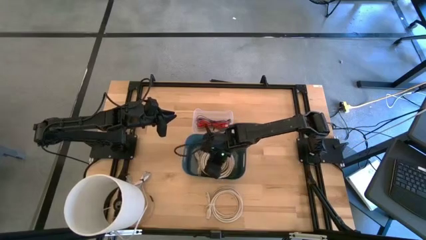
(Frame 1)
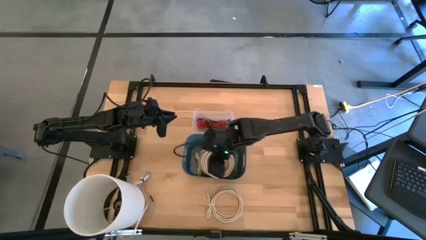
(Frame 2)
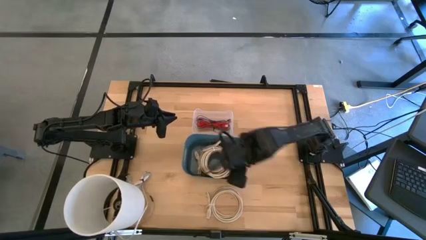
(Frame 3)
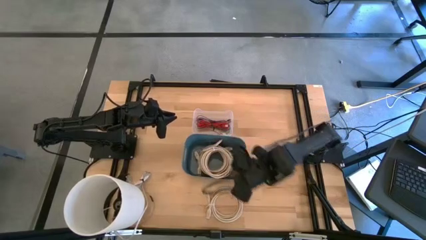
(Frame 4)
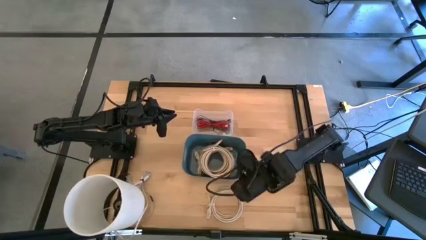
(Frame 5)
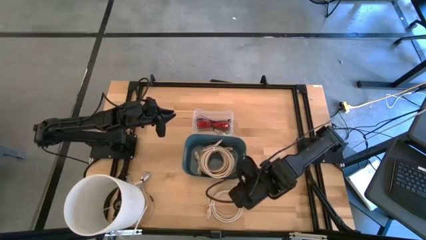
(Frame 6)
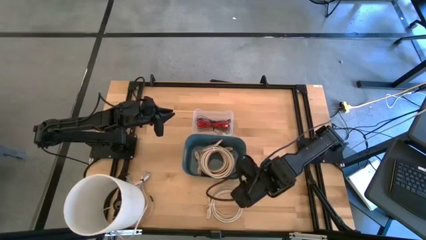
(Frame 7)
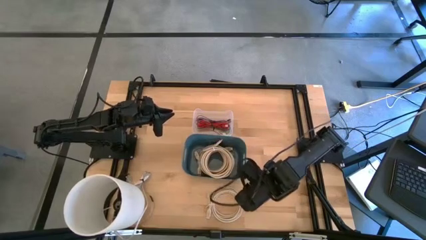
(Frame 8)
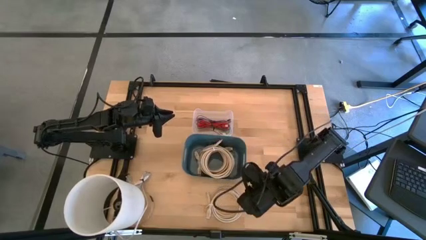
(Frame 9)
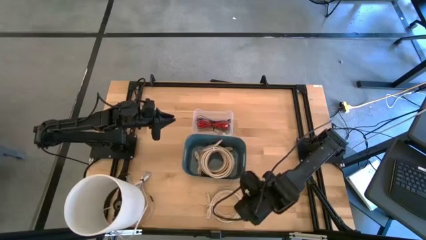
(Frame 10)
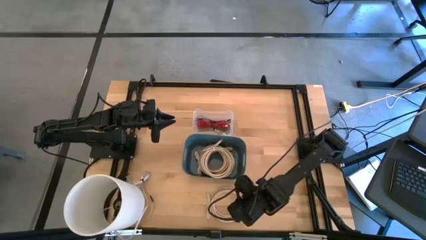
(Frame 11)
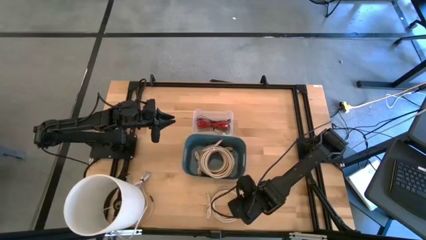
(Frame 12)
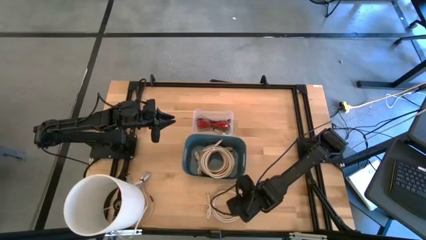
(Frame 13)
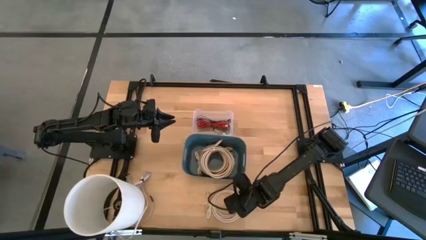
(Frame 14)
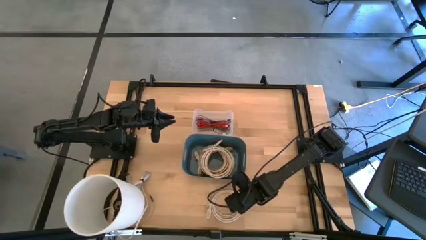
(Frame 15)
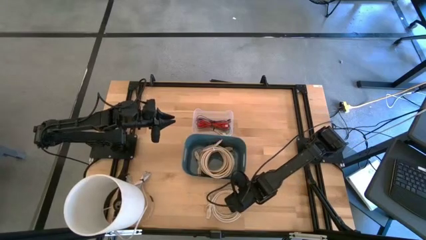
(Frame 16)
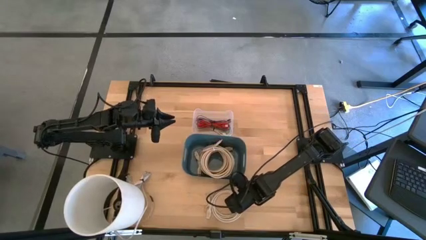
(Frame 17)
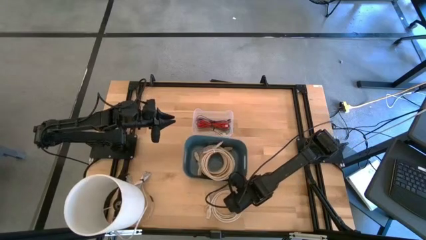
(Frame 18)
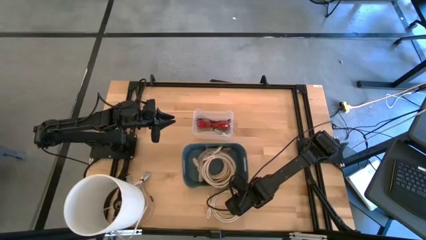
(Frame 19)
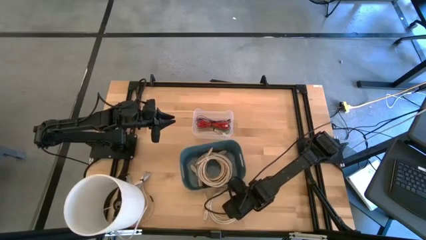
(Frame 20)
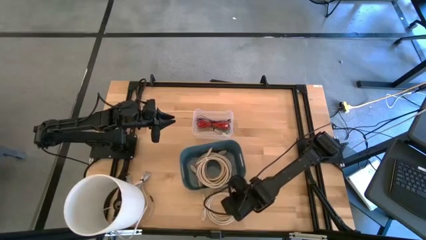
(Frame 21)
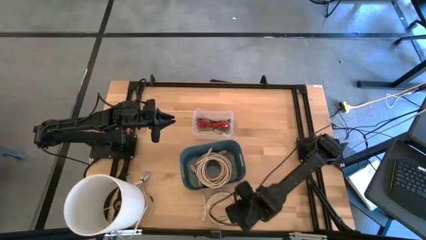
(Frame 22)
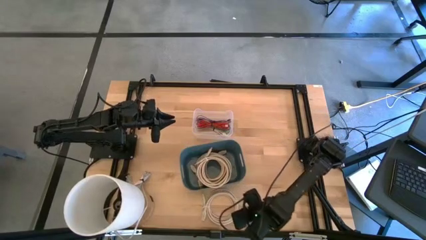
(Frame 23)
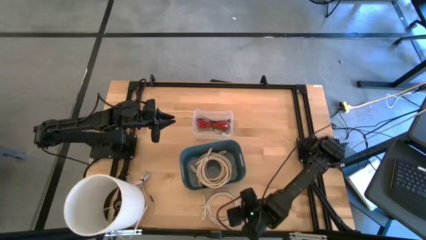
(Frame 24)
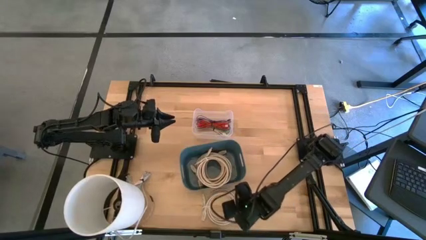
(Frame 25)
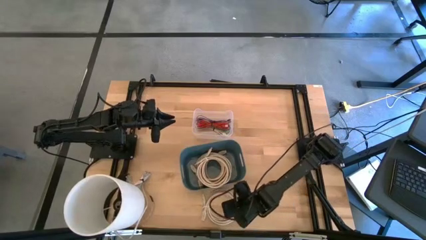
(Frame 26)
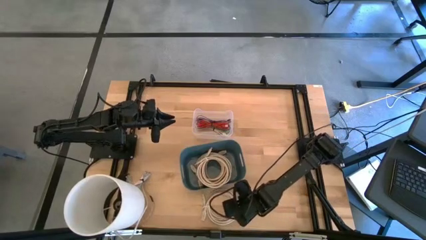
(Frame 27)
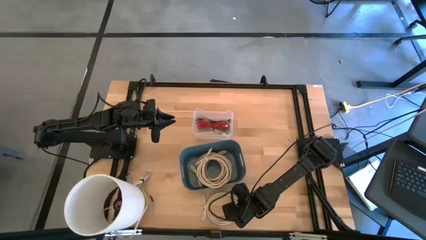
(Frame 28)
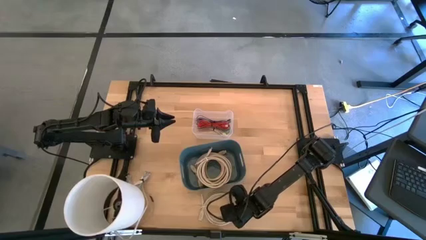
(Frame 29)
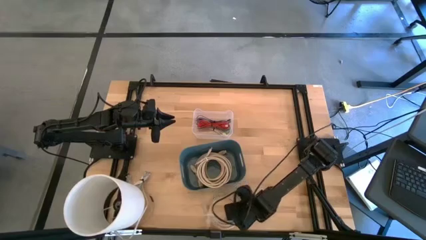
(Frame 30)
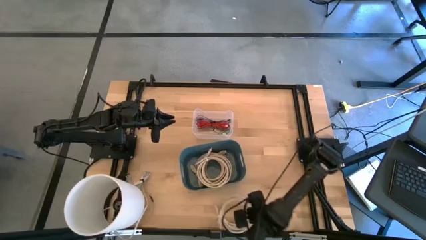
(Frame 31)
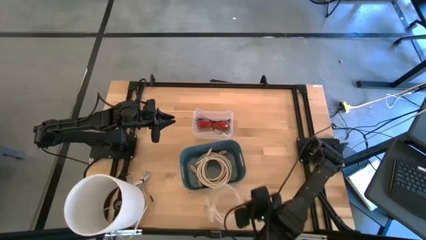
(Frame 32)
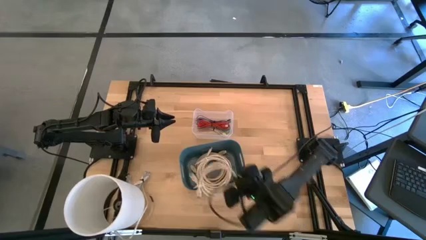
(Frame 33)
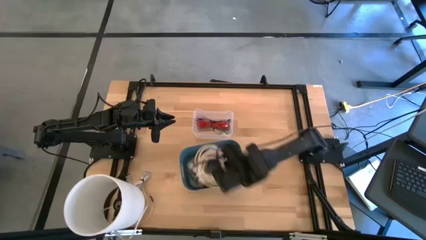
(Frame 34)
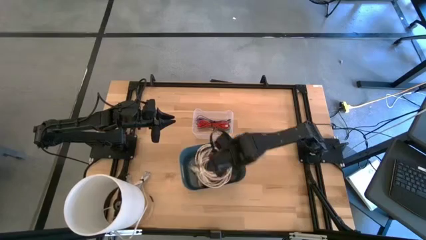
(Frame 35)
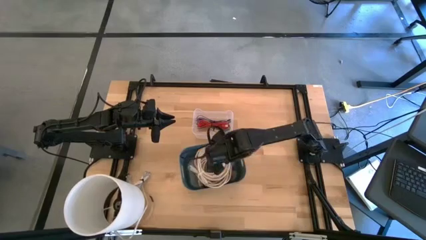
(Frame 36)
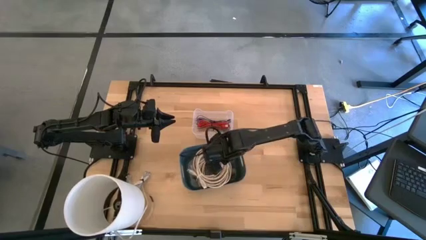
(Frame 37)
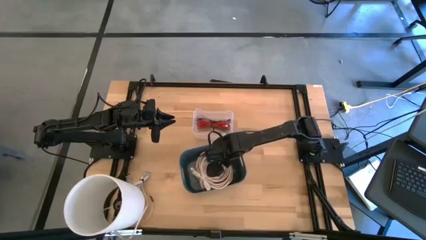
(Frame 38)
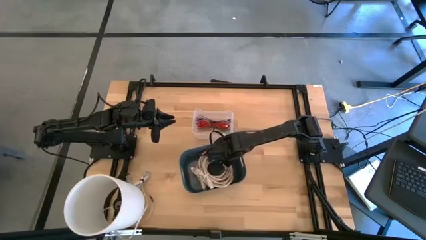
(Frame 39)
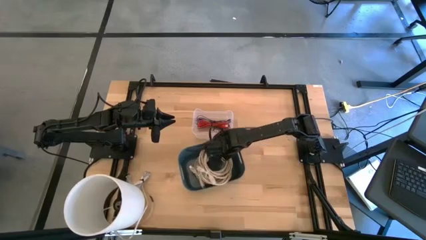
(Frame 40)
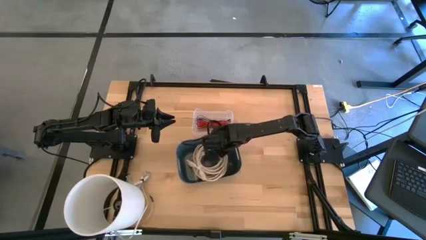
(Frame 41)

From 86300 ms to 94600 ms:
Put the brown HDMI cable into the blue bin

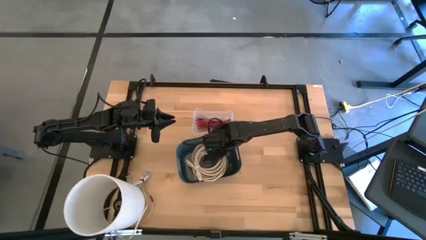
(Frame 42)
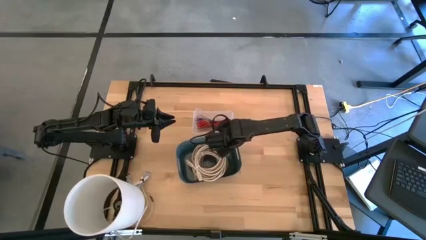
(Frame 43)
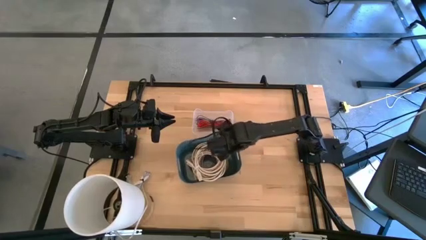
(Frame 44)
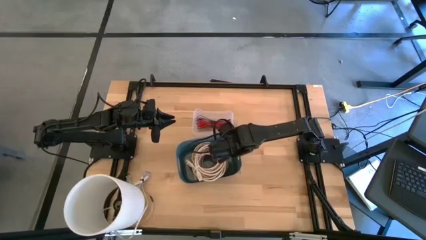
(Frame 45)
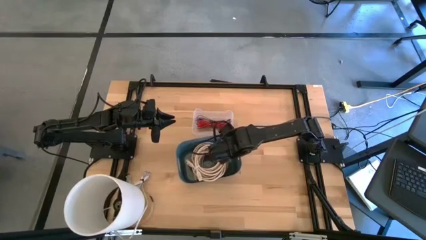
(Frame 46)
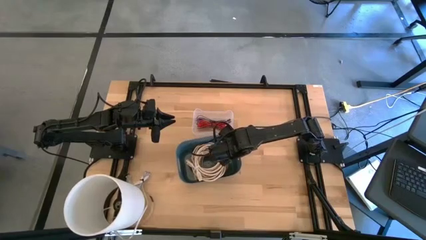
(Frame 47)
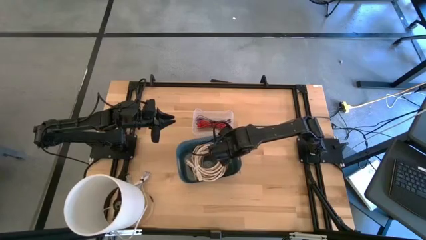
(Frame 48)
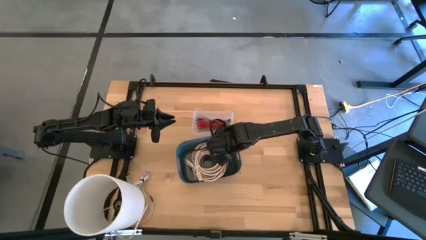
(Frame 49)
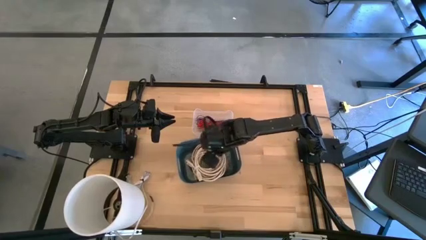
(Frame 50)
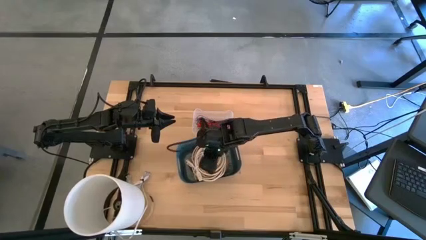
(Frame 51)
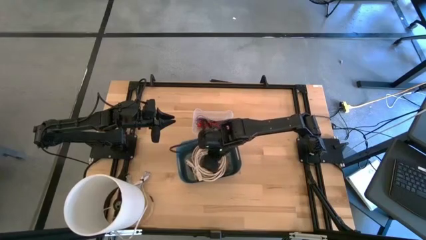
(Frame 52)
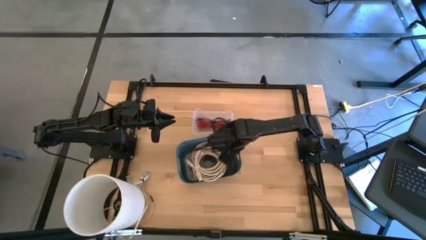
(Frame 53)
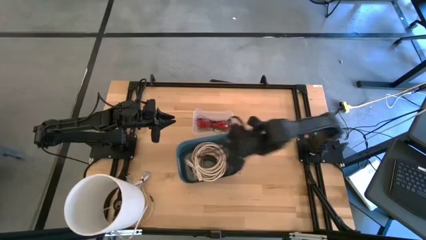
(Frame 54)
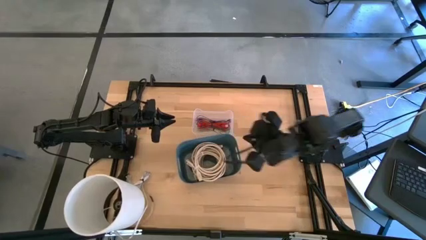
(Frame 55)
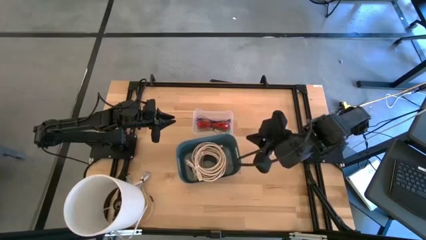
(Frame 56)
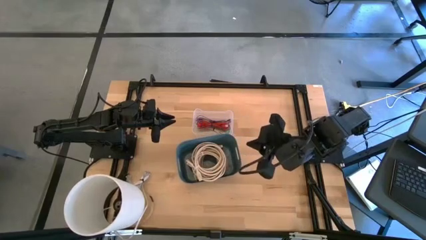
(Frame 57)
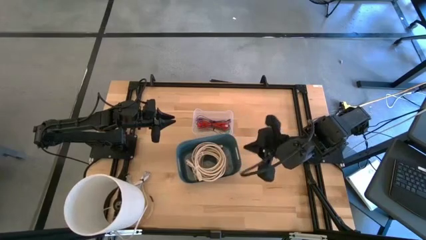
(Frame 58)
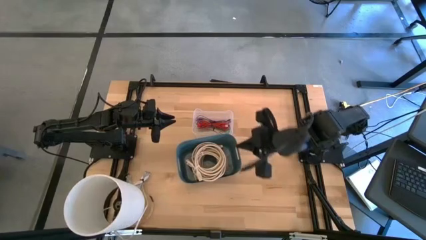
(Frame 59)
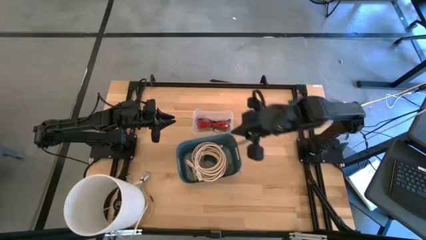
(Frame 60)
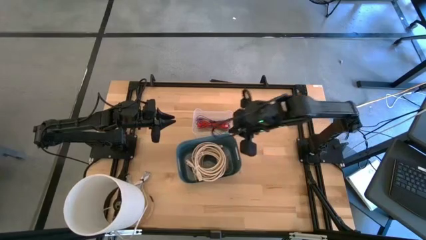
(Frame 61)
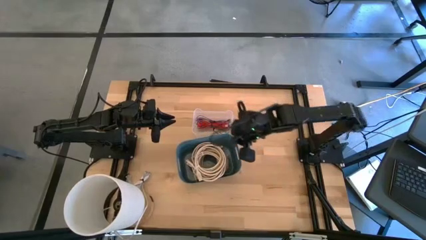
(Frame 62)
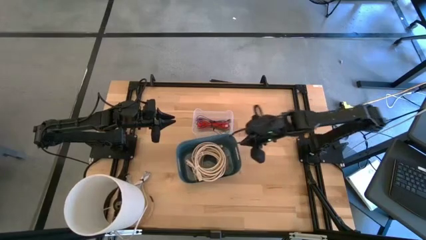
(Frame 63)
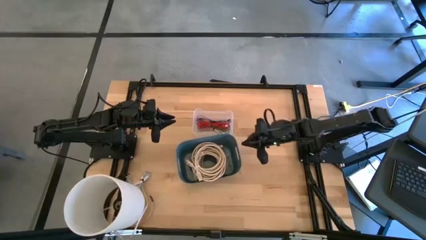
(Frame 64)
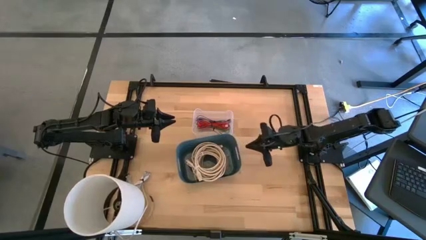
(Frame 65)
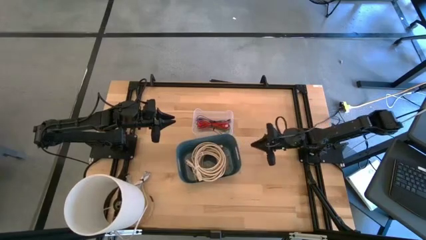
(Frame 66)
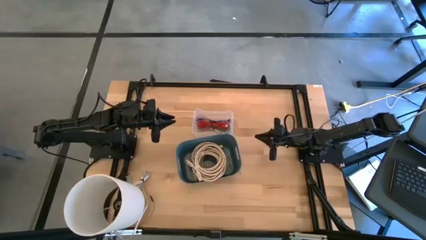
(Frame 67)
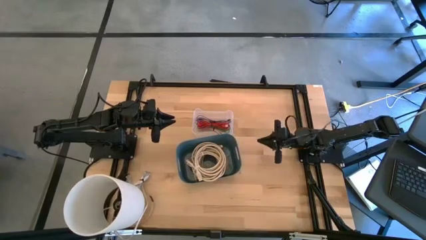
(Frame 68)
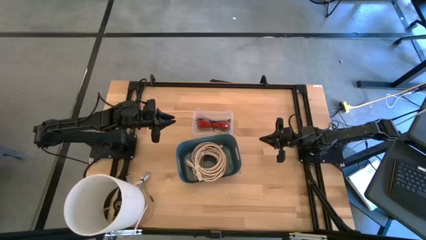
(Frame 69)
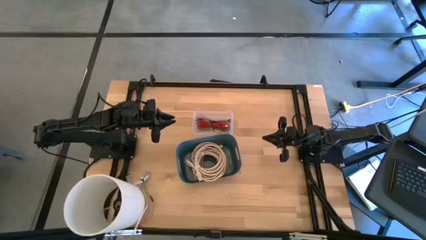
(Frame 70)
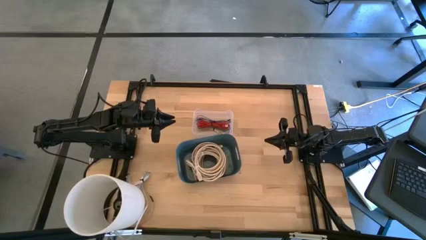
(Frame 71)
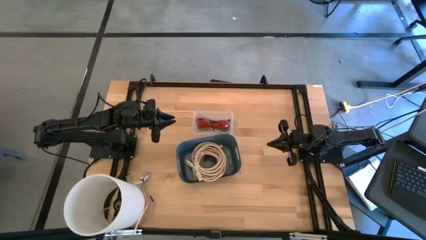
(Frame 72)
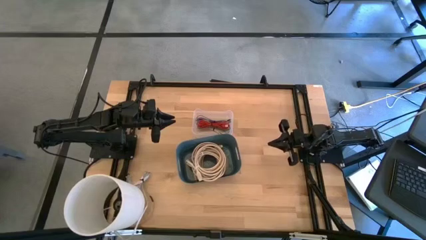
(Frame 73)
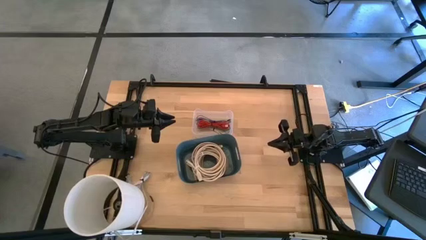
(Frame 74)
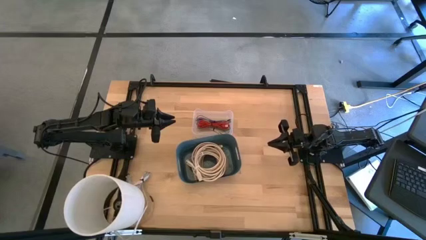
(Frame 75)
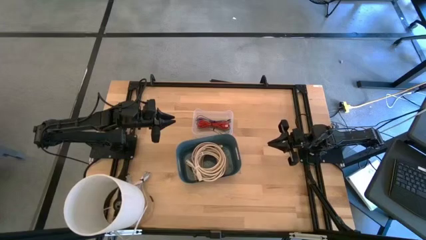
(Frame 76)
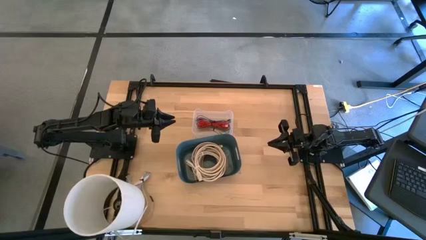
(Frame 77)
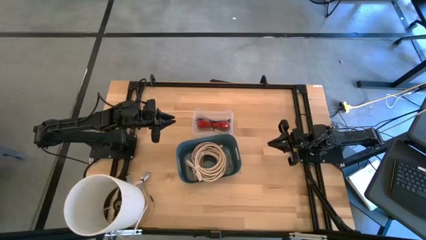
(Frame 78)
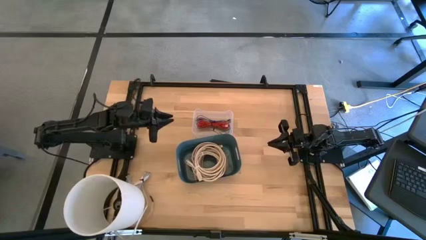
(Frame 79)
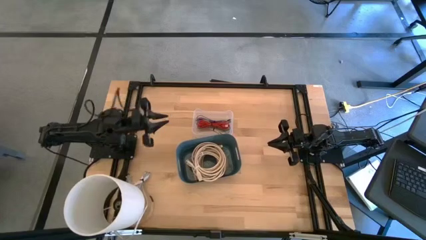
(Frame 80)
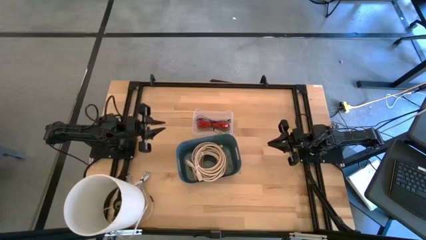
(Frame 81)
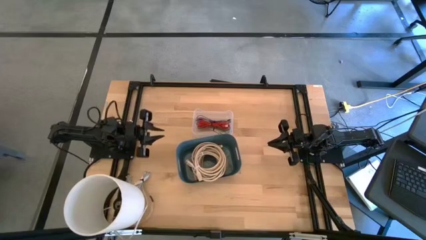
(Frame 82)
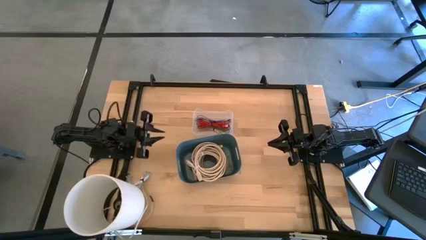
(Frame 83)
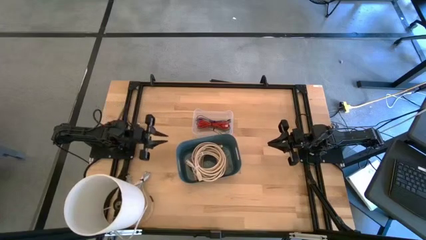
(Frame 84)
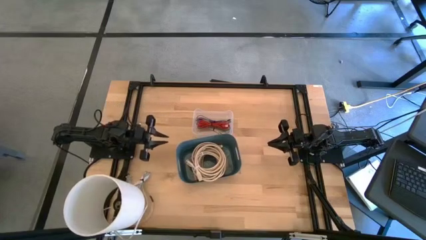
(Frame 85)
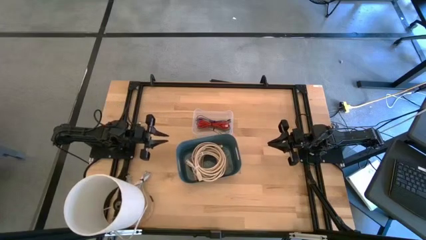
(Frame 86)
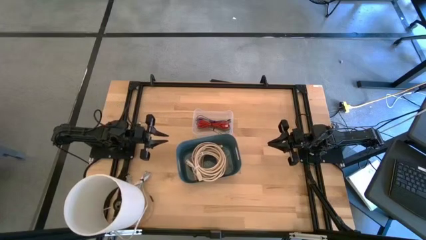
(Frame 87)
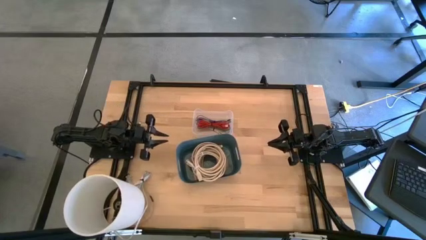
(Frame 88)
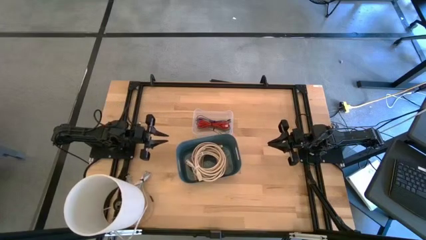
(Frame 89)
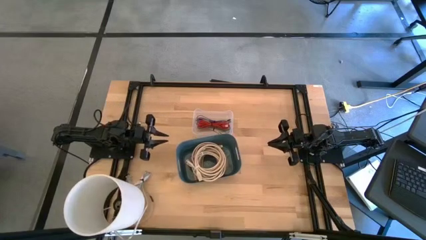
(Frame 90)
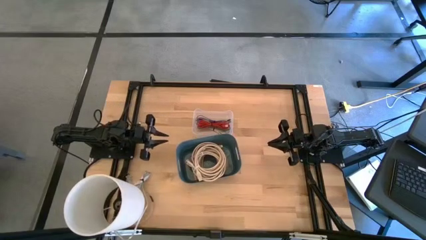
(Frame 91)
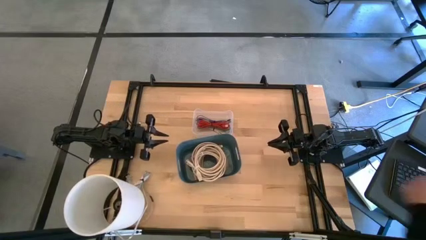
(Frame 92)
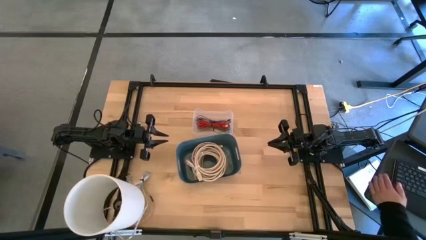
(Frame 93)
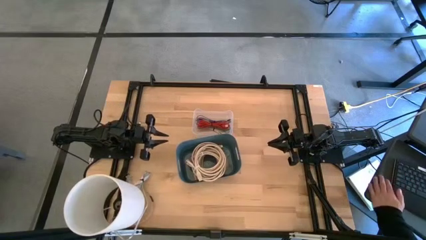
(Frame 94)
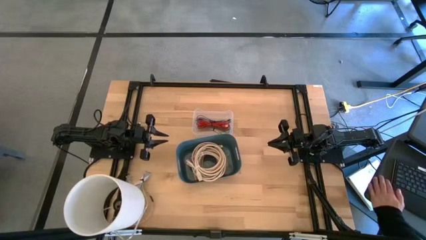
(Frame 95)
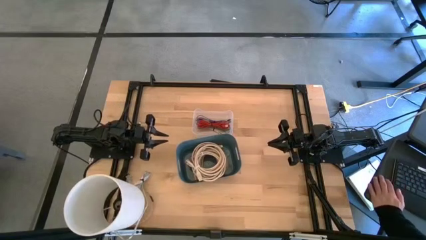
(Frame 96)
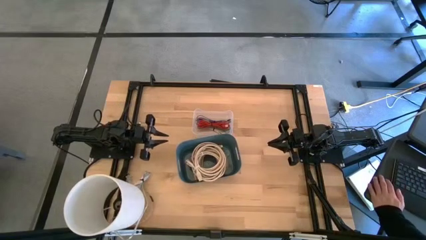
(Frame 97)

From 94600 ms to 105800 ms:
Return to Home Position
